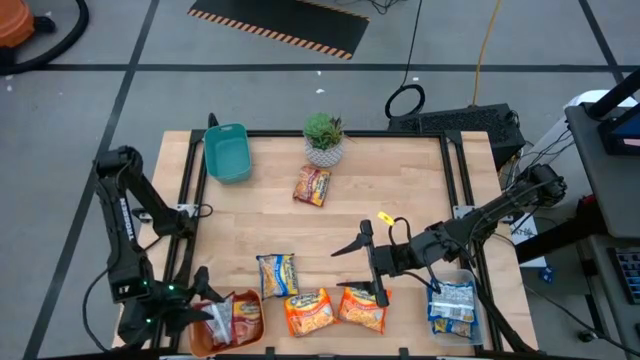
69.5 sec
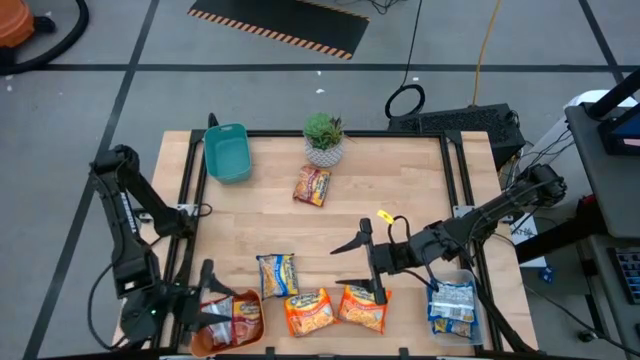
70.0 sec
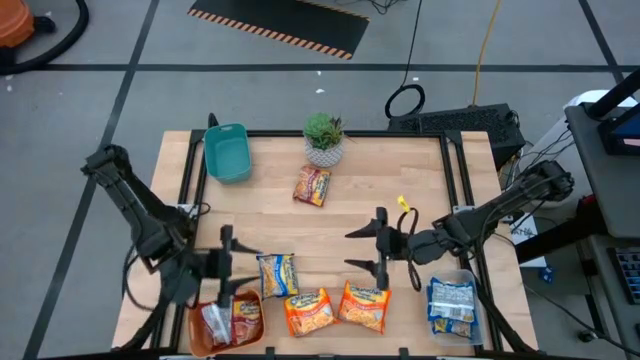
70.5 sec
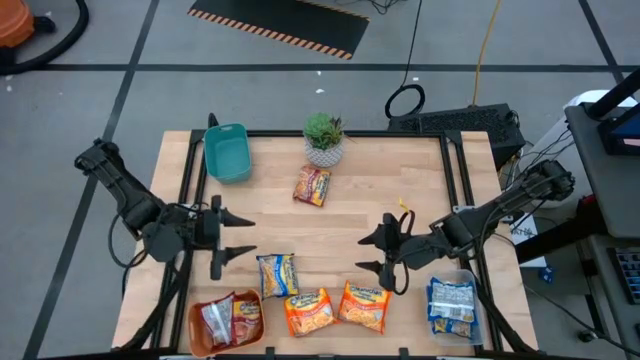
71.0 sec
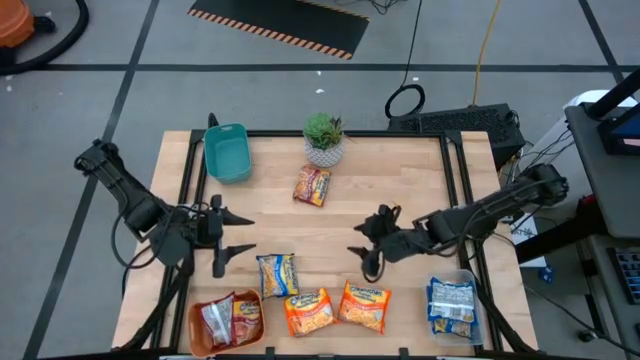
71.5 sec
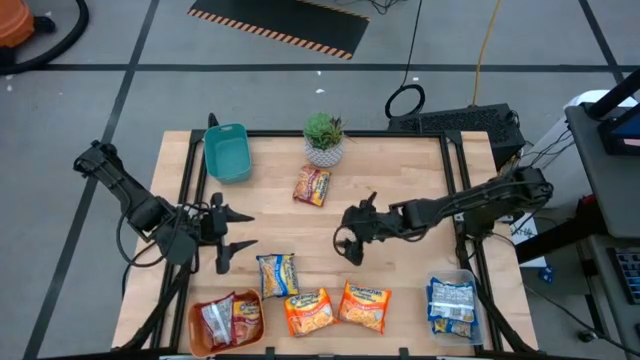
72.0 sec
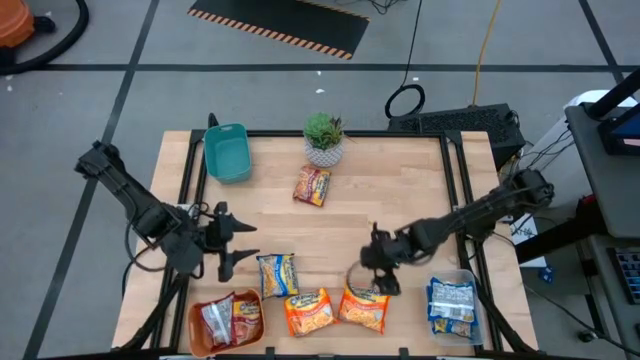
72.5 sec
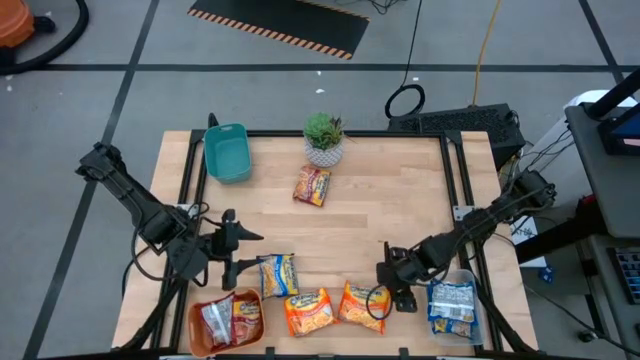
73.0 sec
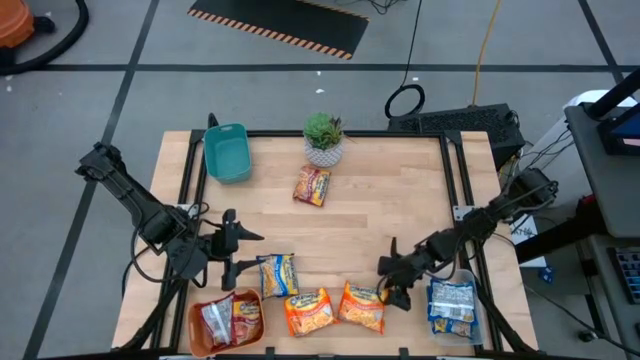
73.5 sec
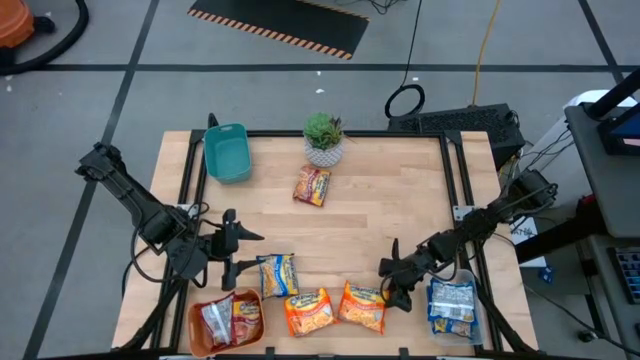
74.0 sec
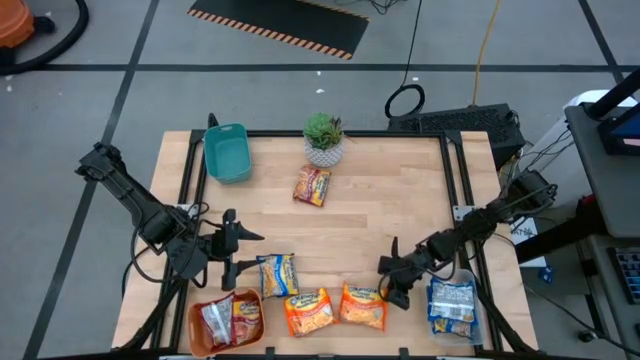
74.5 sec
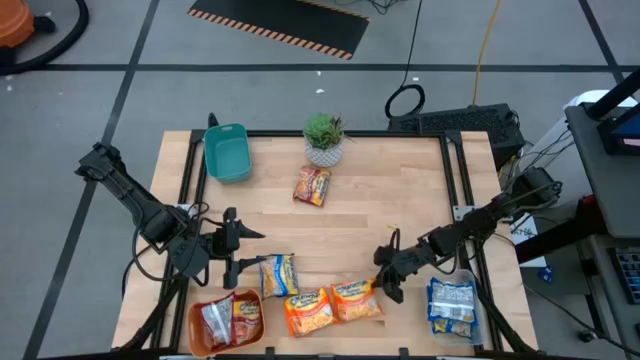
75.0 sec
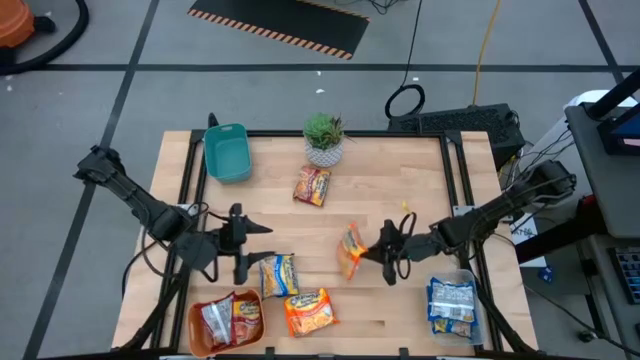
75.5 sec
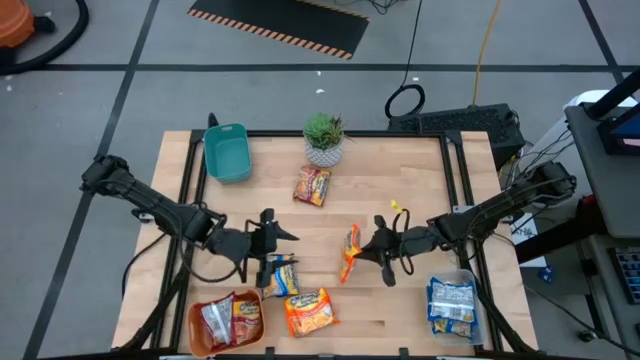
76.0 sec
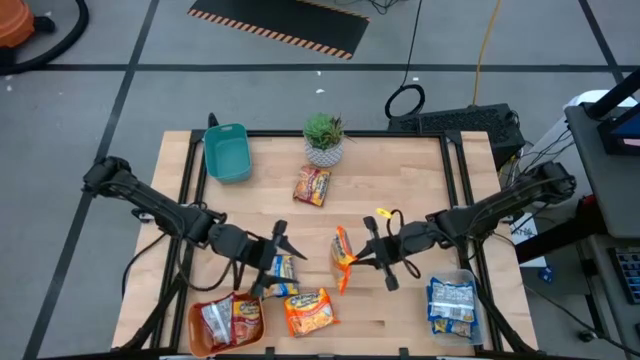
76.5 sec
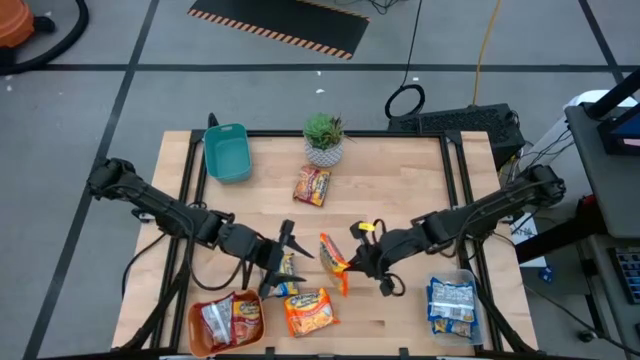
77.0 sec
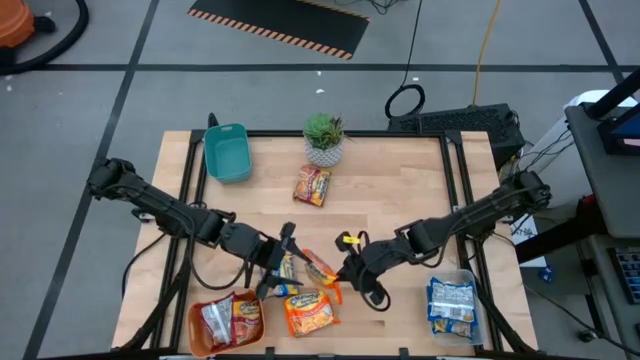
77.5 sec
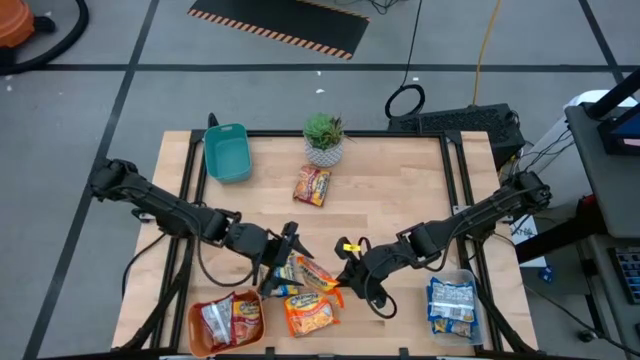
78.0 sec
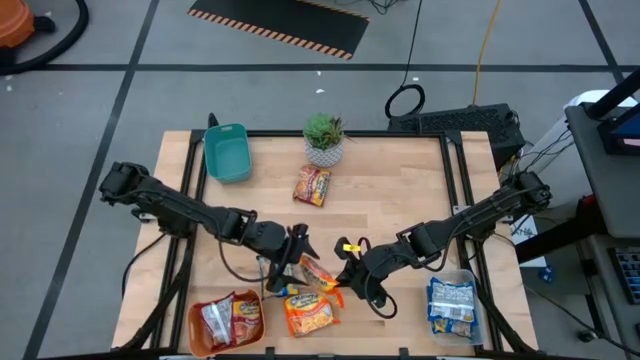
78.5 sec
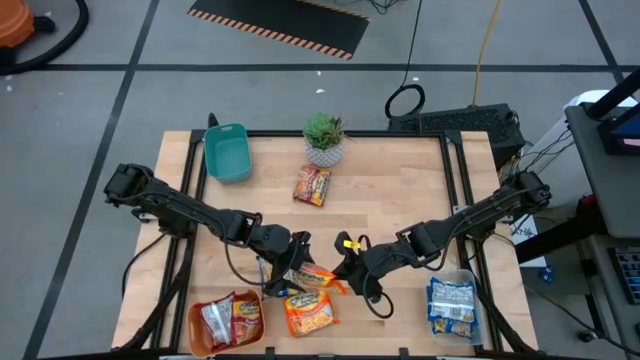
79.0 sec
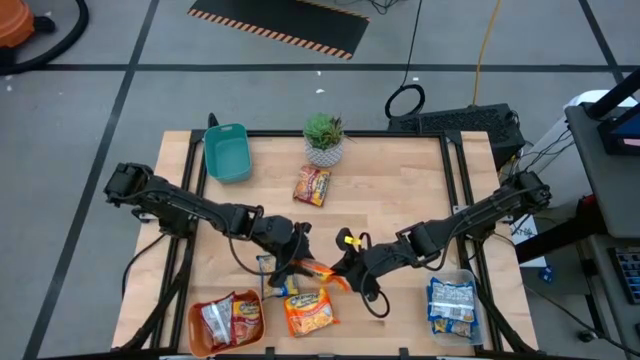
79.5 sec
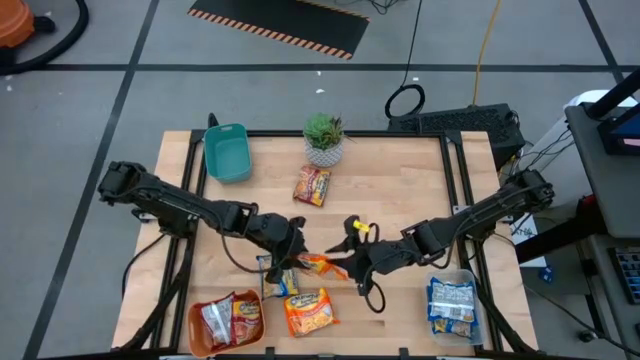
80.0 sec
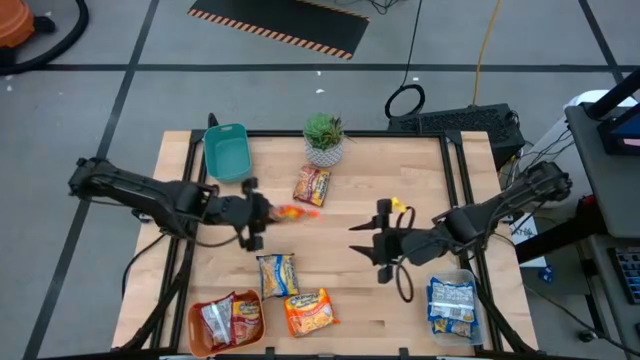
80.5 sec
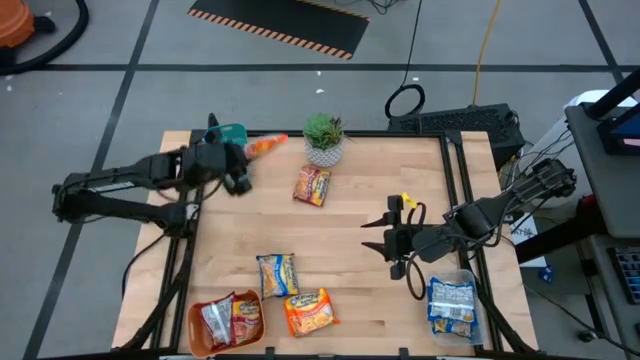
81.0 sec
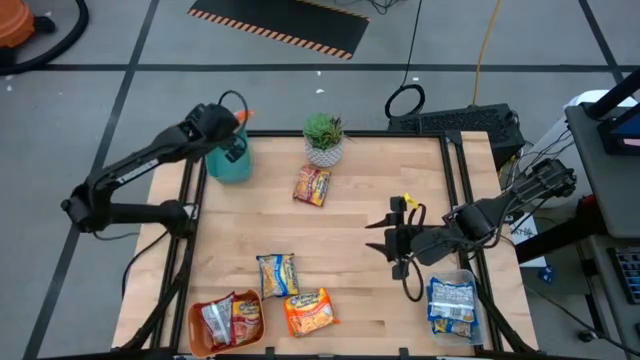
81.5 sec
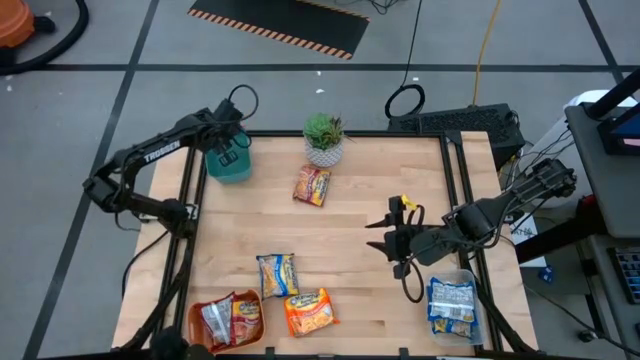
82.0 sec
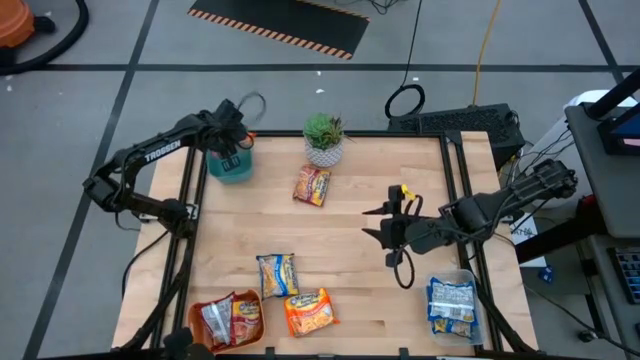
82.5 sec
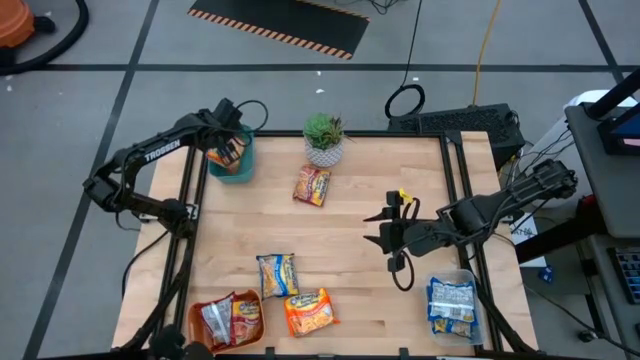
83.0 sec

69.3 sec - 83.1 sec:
Task: Sort Maruchan noodles
Put the right orange noodle pack into the blue bin

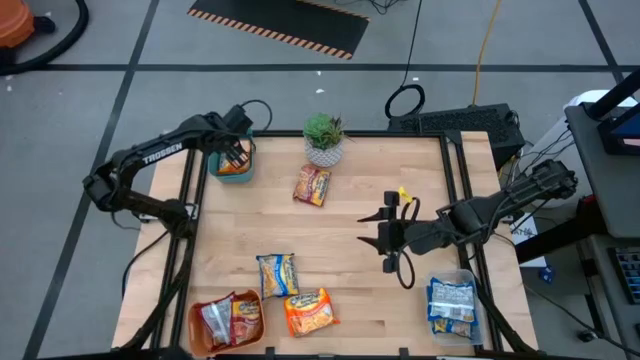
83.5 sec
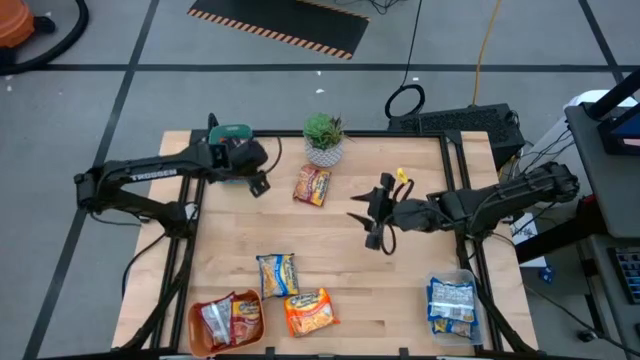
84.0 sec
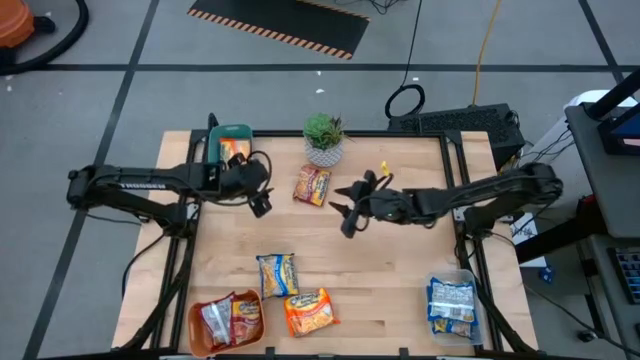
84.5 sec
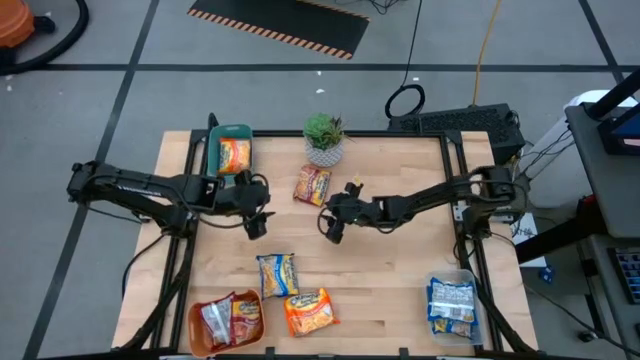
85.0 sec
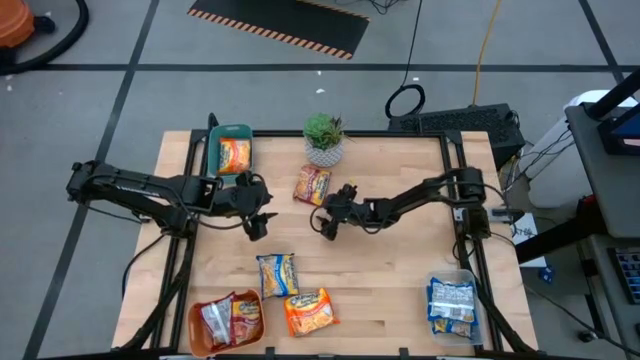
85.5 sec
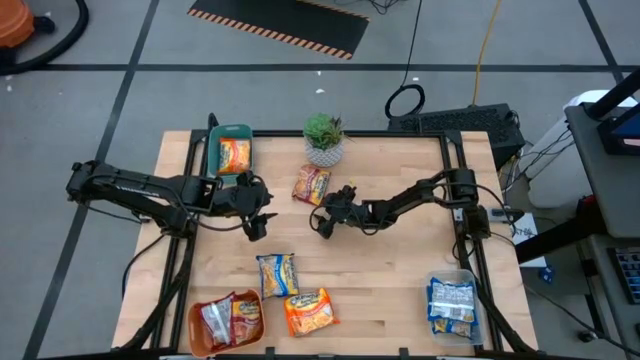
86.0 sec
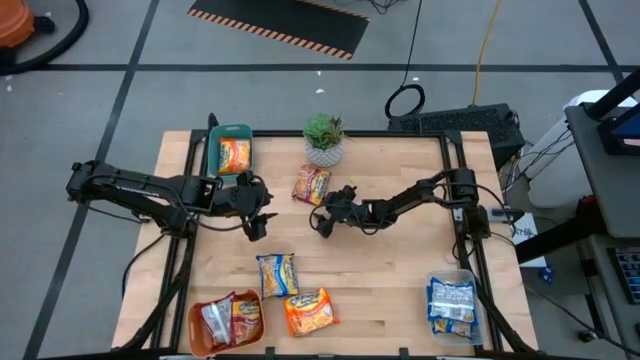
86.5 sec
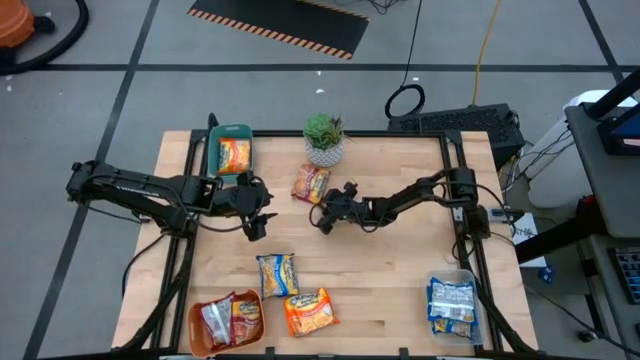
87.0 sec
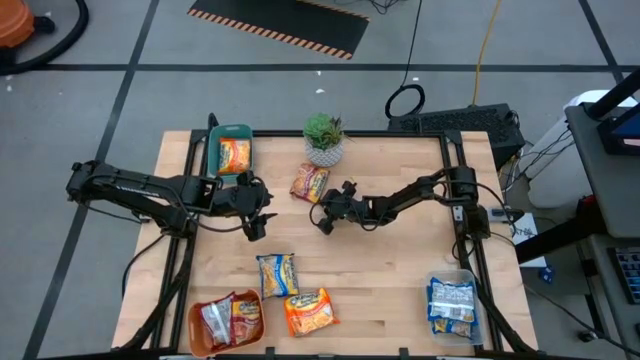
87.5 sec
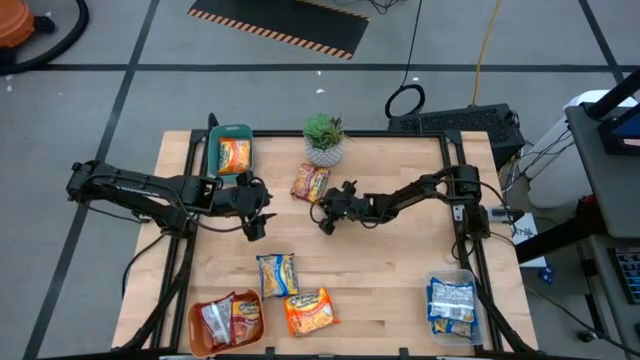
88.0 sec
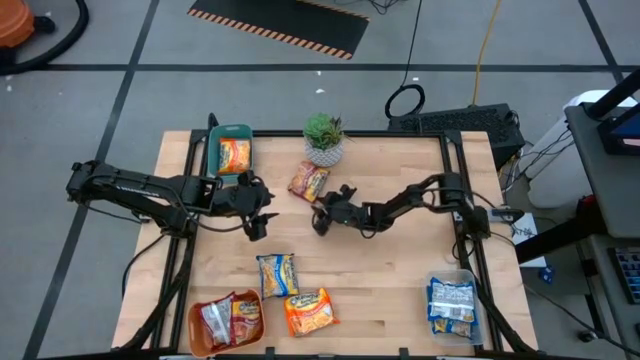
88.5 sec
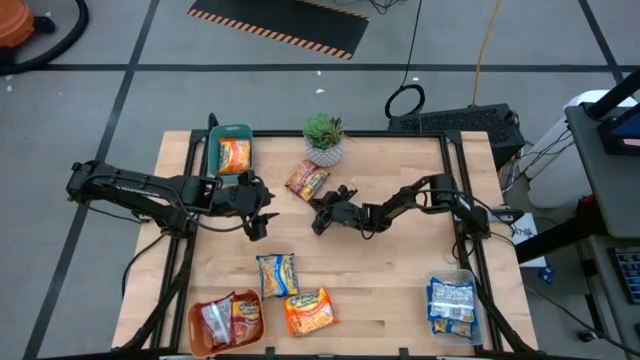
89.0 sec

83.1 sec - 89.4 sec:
Put the red noodle pack into the orange bin
